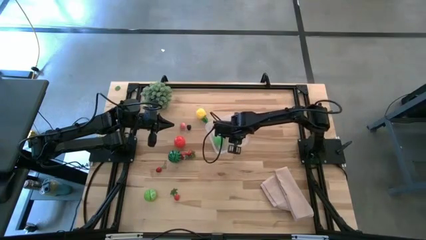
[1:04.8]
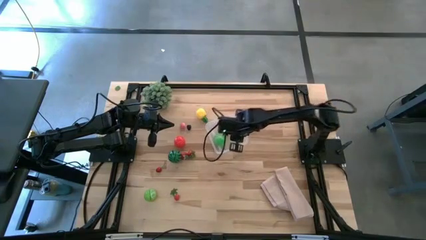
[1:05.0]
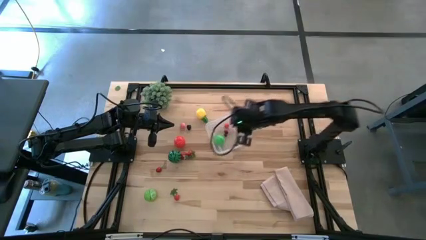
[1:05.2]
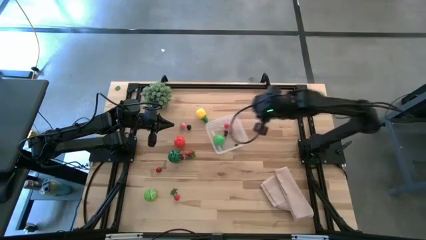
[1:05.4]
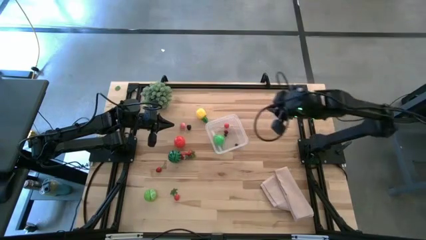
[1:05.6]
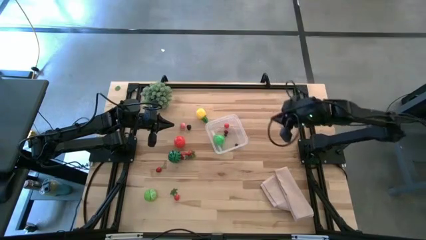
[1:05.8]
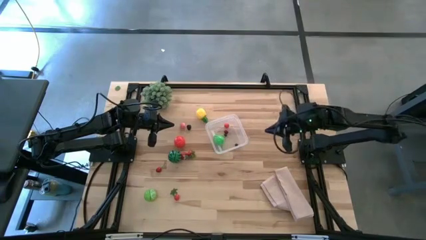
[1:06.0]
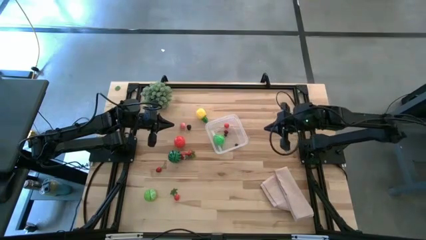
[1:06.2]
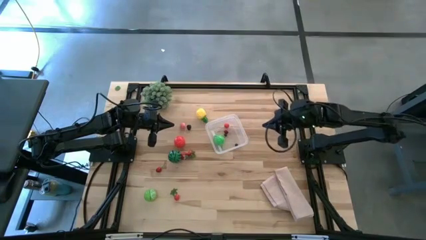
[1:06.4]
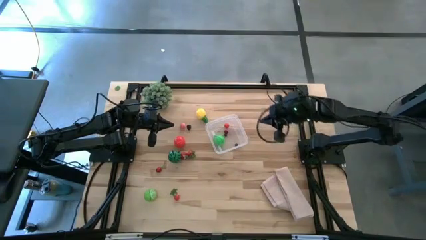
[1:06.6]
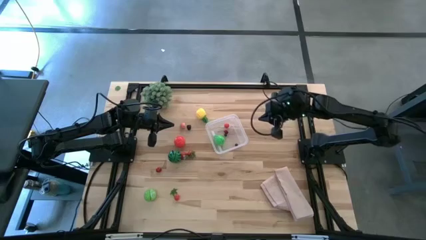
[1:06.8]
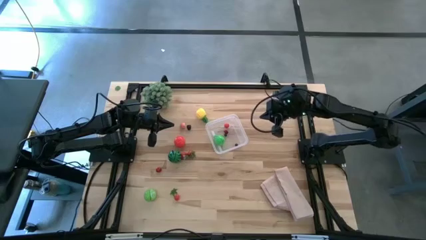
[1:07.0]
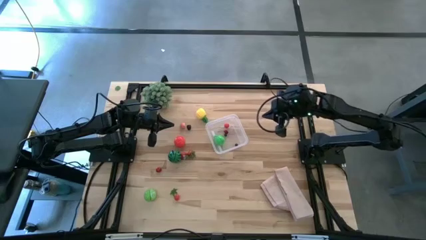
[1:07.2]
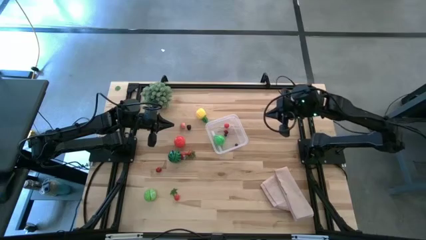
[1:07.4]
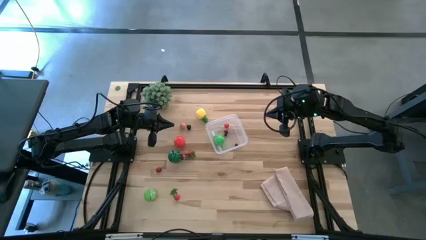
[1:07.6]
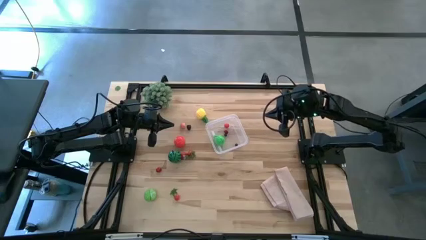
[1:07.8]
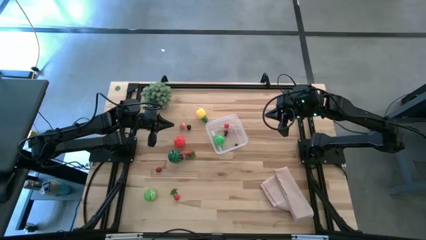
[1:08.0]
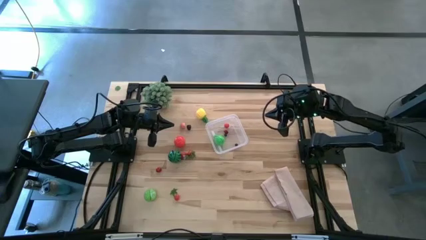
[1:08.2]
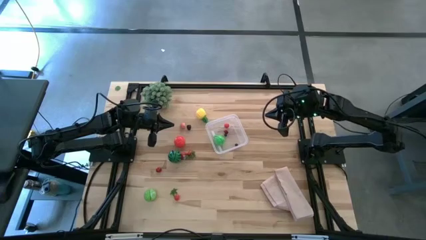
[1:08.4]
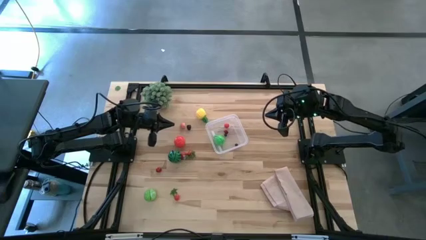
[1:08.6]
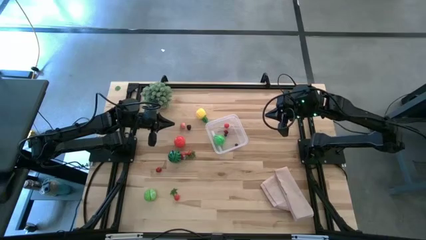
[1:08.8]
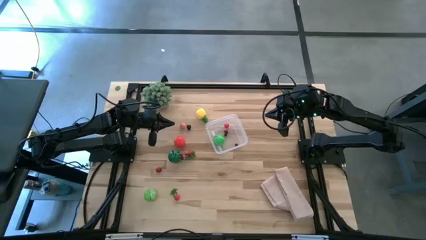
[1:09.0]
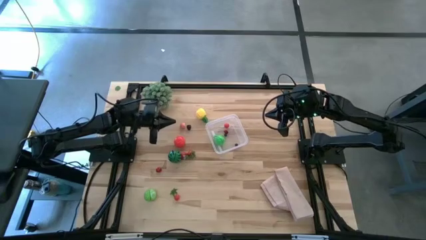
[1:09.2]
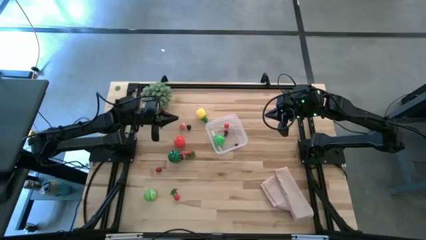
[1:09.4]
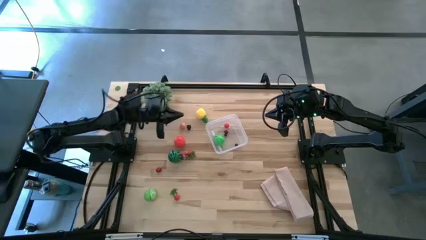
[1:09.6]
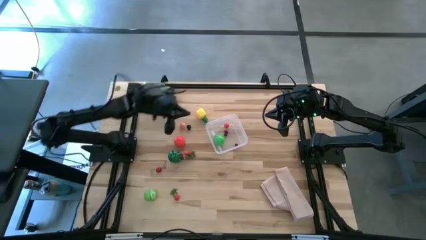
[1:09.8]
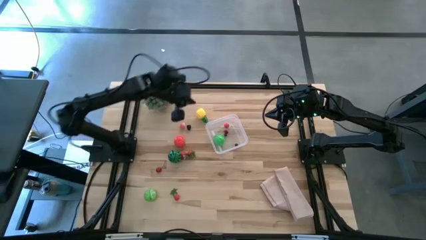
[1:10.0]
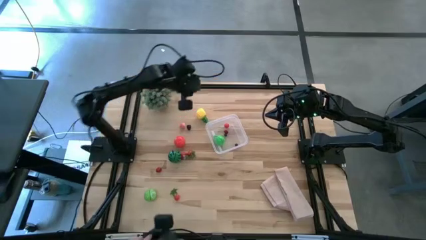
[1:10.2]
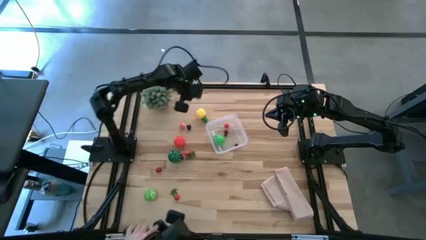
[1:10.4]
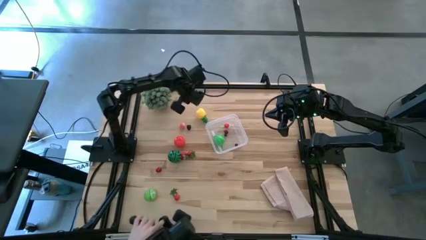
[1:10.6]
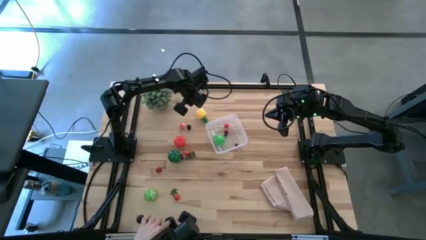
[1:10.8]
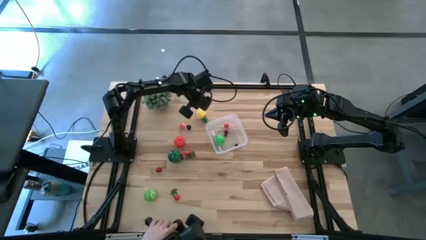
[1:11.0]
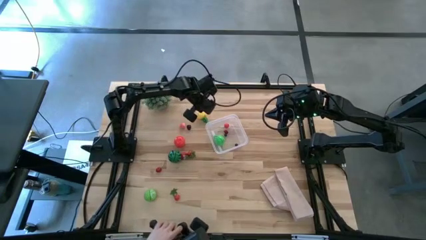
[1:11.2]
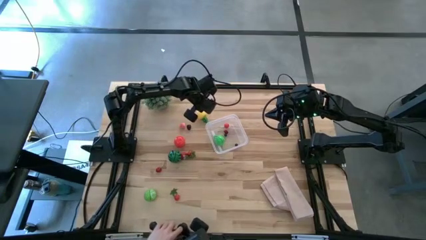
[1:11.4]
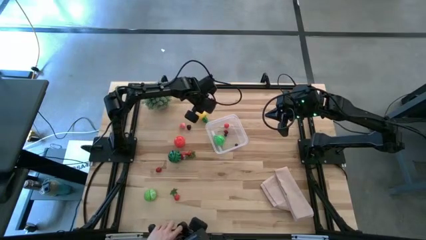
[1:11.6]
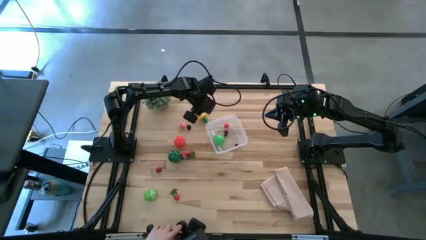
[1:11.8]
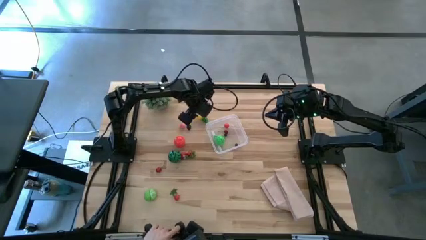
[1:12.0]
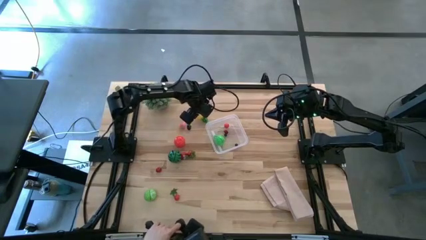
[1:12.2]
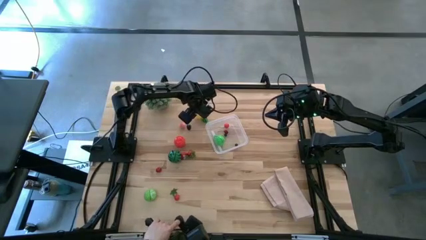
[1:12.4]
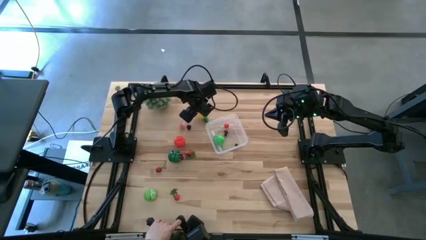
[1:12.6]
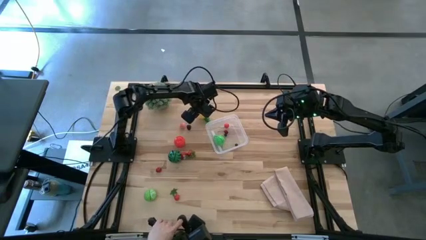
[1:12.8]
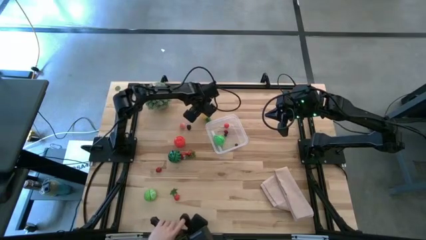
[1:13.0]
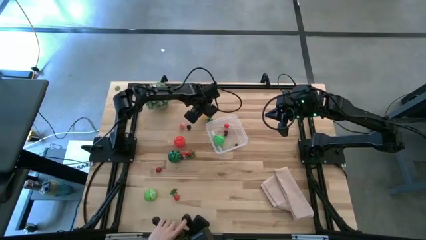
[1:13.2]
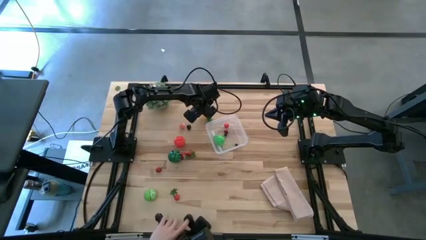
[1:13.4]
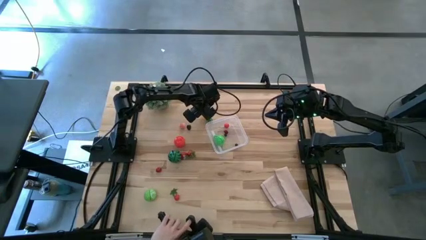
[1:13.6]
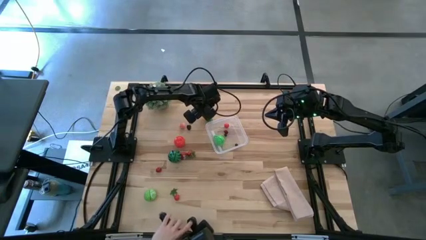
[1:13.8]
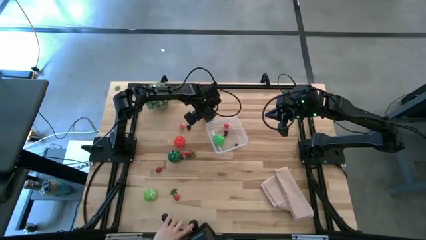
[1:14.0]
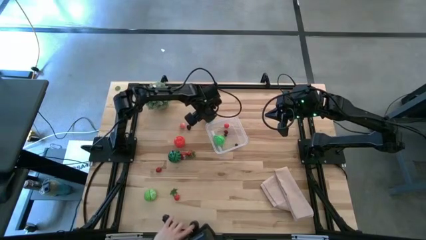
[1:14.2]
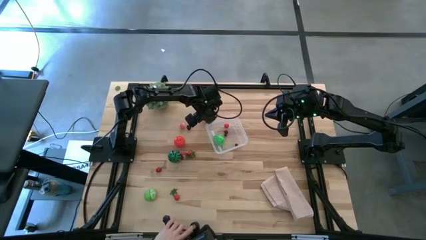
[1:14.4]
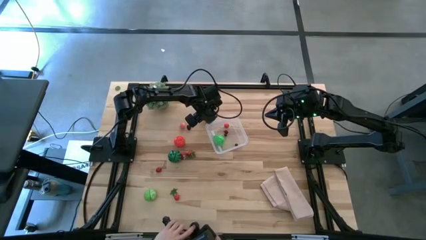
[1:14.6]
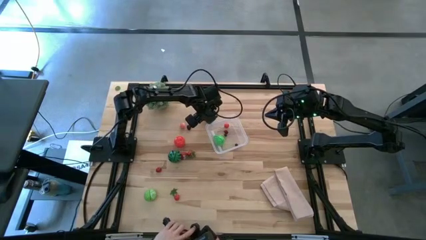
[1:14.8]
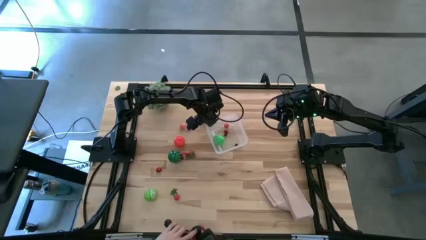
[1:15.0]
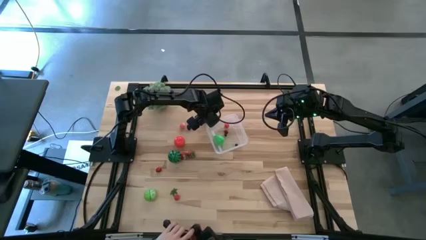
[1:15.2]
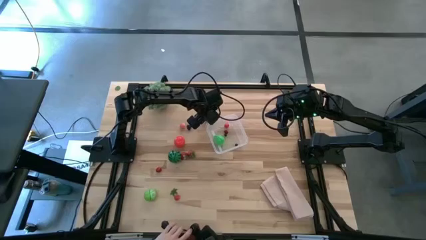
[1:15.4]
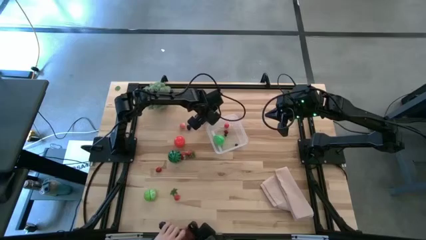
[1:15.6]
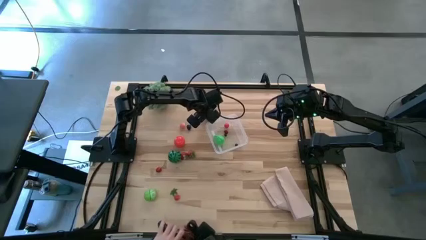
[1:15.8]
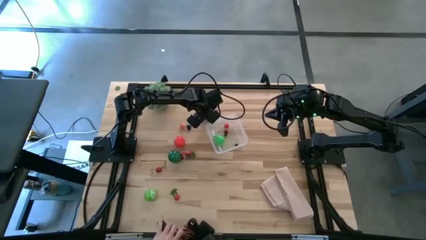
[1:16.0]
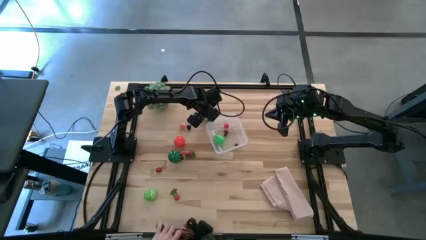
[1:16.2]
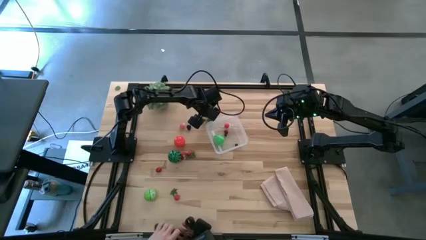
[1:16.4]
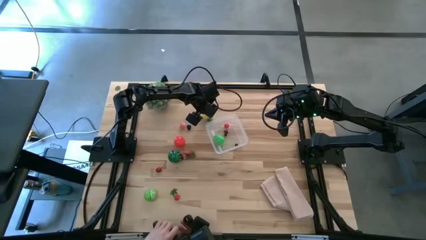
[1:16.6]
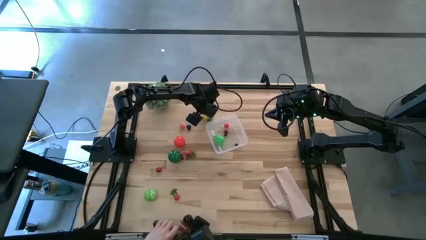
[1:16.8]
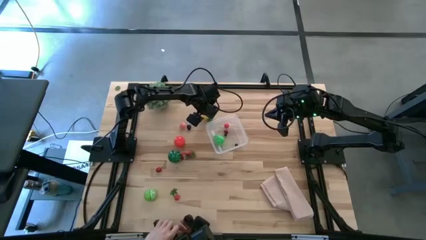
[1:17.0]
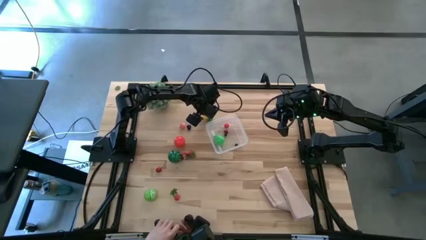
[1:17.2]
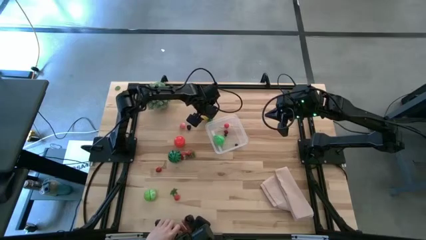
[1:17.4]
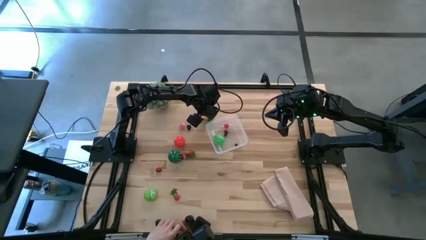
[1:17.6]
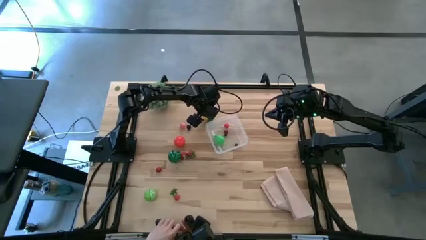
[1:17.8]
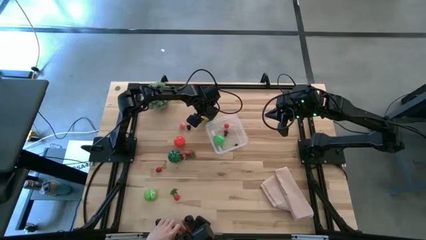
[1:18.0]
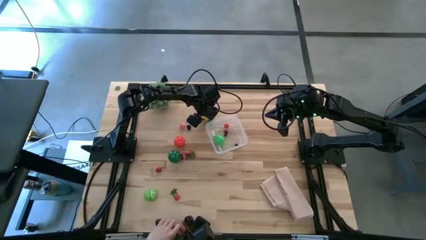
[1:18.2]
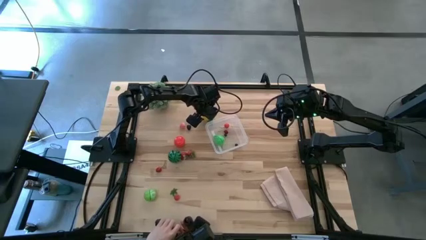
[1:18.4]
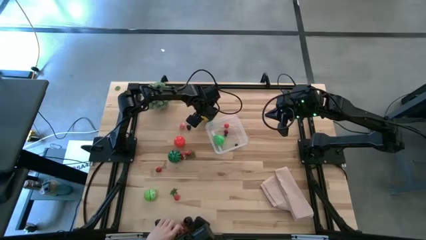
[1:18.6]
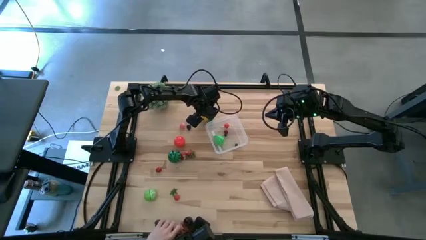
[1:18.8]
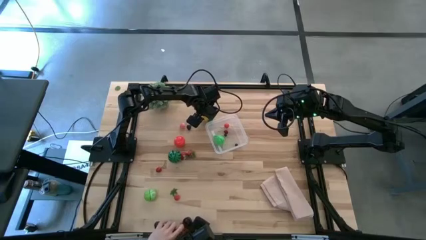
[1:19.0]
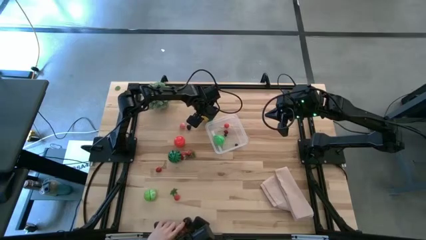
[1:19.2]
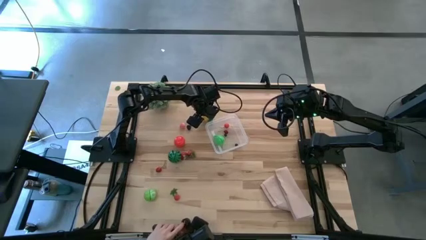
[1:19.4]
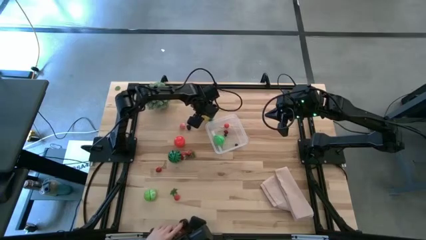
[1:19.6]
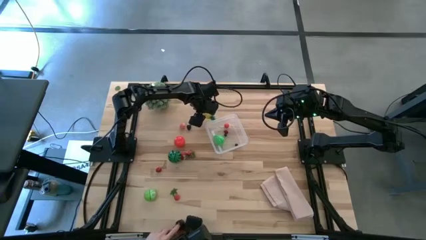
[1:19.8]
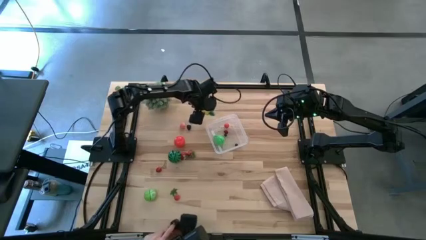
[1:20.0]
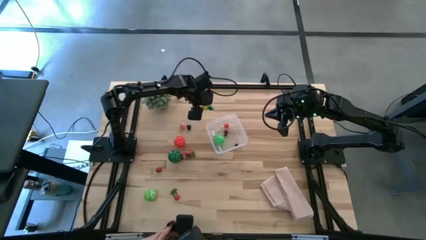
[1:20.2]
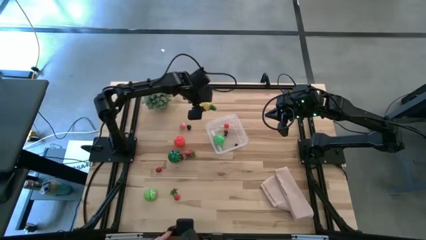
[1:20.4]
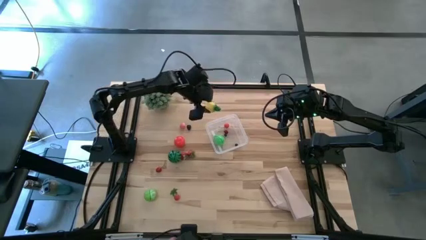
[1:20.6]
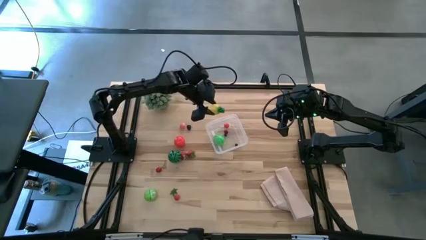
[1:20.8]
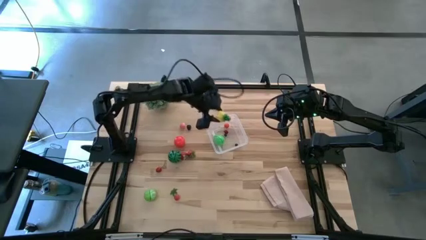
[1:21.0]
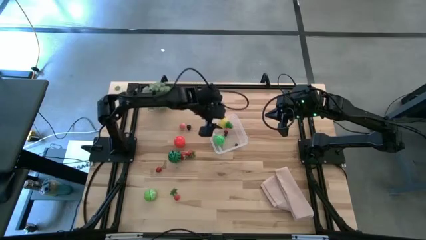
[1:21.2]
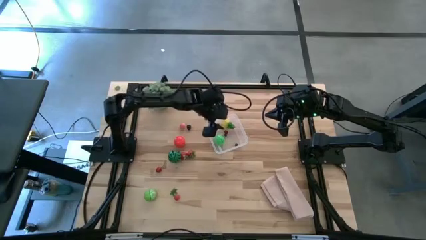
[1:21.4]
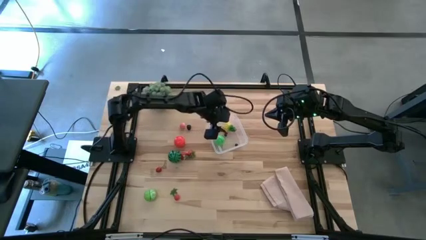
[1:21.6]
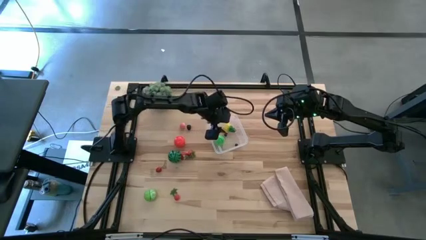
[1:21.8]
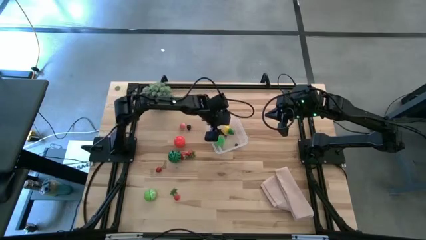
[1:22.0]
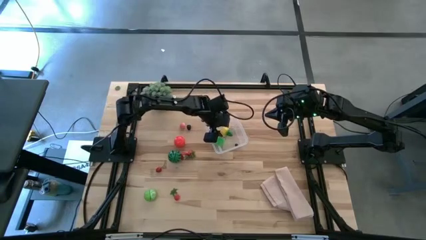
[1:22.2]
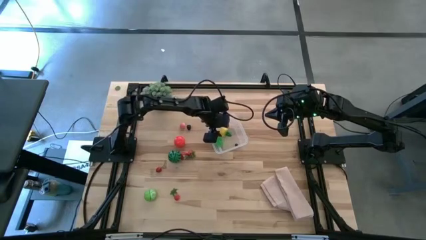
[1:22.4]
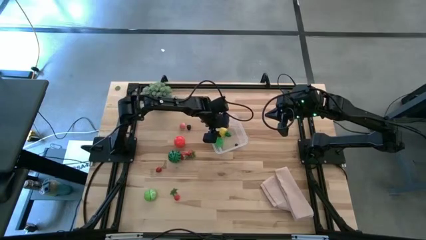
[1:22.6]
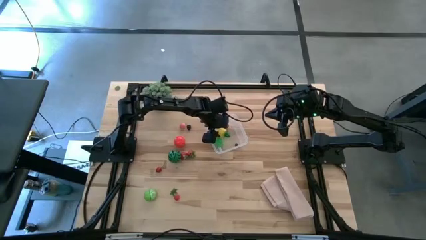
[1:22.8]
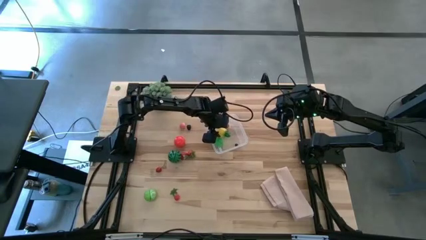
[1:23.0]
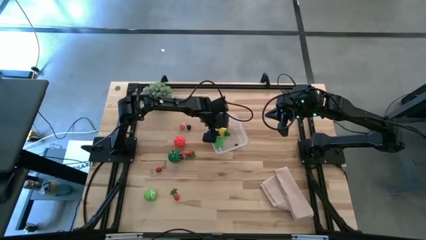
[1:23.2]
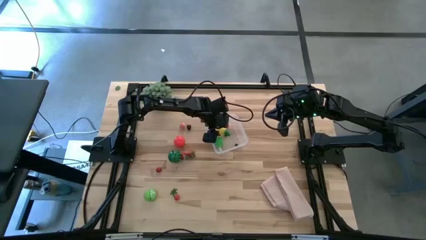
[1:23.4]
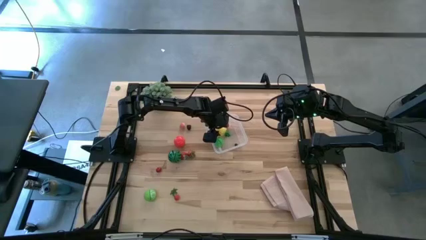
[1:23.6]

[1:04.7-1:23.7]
Task: Pick and placing Produce into tupperware
Put the yellow pineapple into the transparent bin
